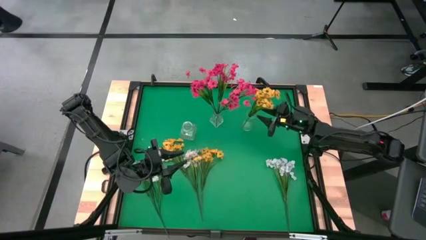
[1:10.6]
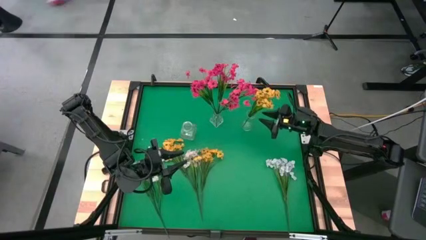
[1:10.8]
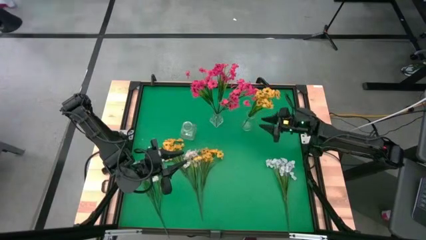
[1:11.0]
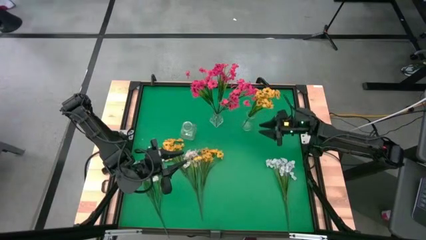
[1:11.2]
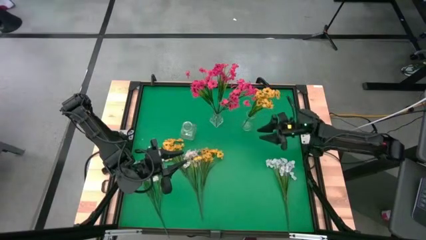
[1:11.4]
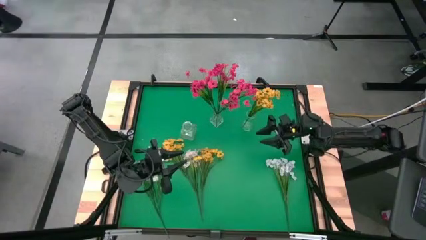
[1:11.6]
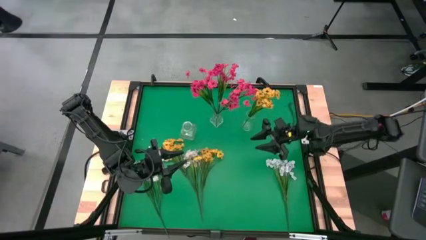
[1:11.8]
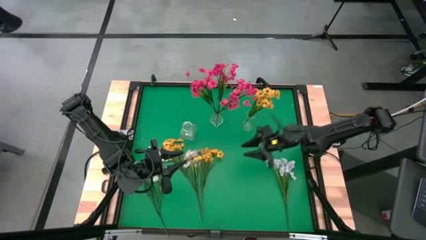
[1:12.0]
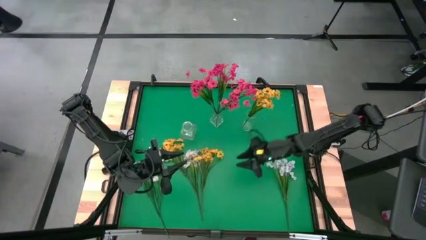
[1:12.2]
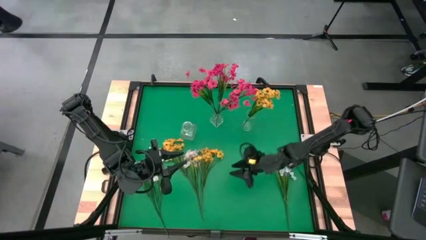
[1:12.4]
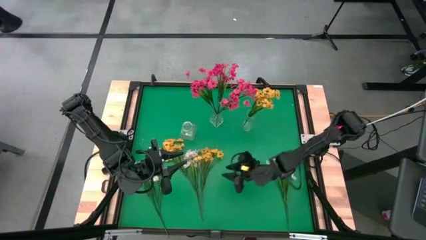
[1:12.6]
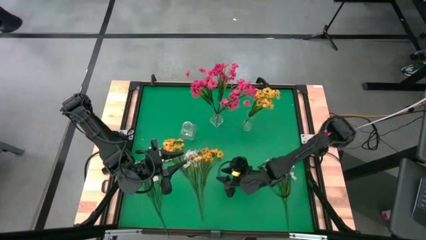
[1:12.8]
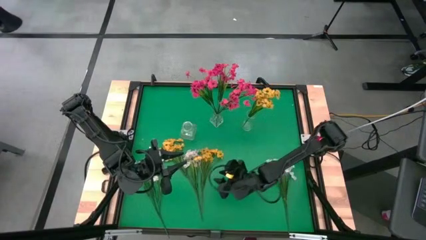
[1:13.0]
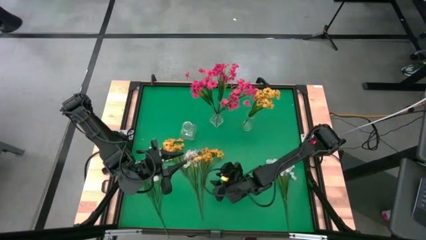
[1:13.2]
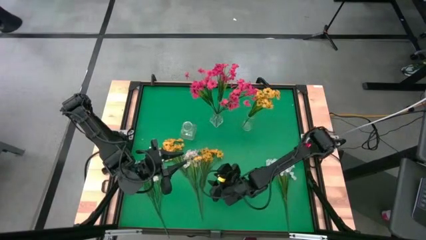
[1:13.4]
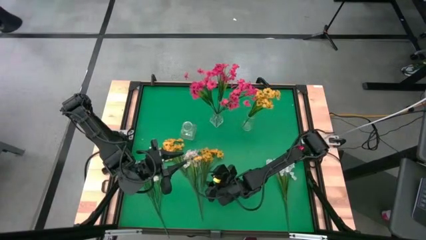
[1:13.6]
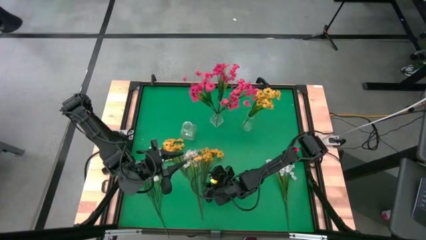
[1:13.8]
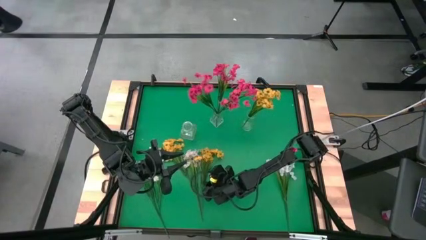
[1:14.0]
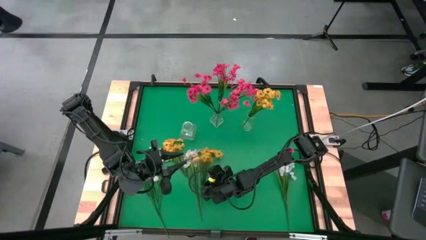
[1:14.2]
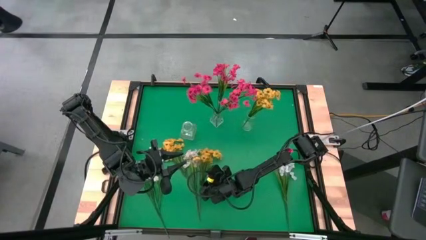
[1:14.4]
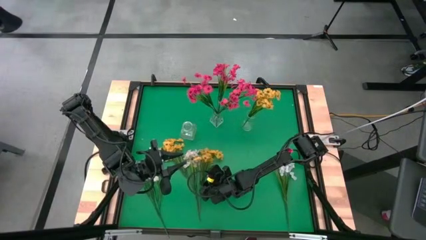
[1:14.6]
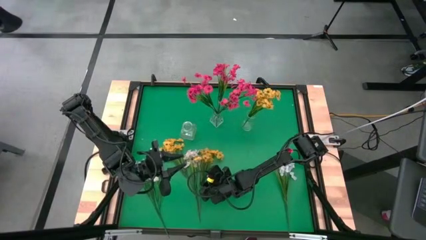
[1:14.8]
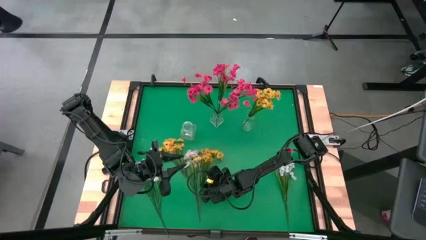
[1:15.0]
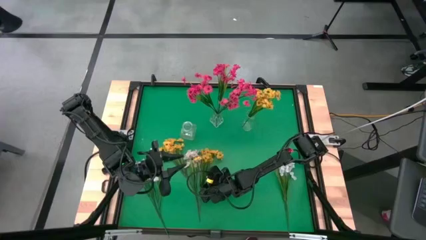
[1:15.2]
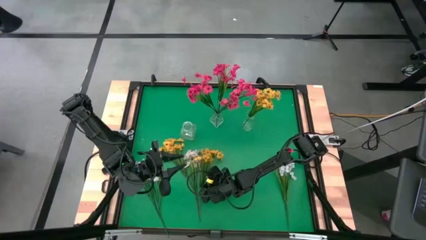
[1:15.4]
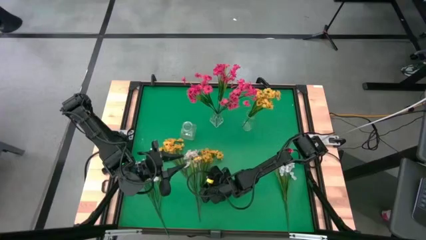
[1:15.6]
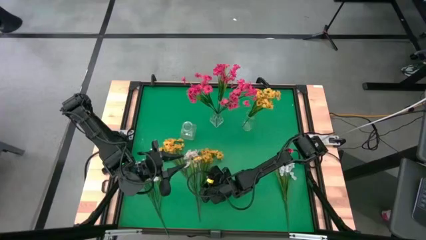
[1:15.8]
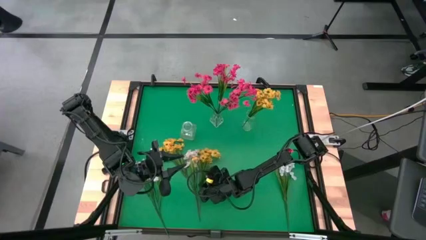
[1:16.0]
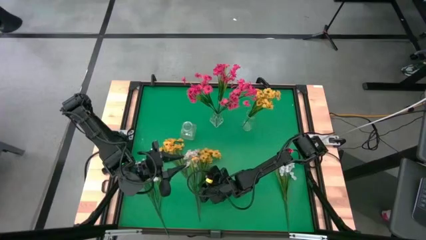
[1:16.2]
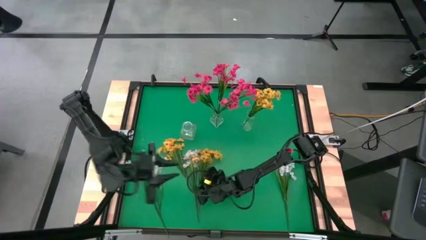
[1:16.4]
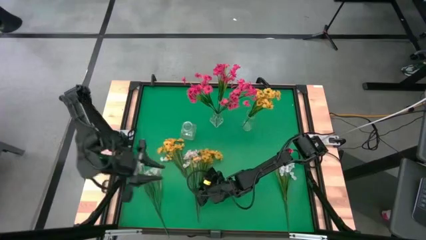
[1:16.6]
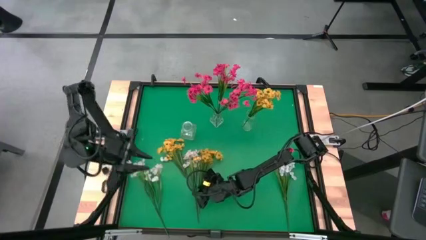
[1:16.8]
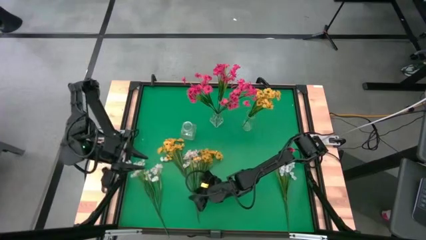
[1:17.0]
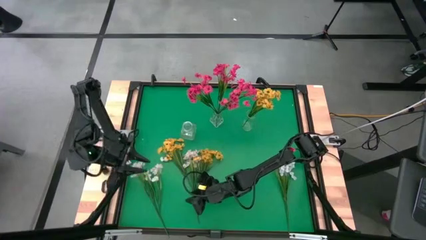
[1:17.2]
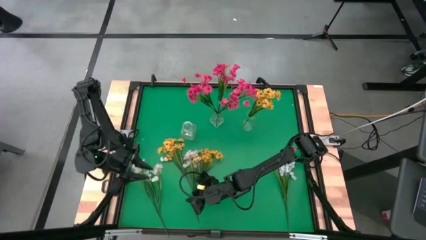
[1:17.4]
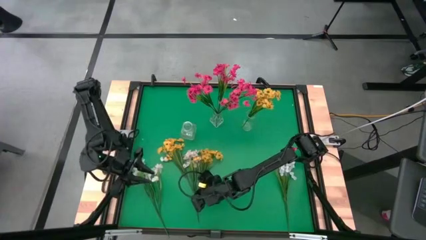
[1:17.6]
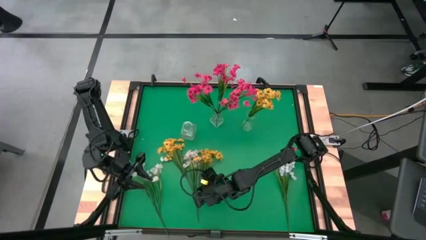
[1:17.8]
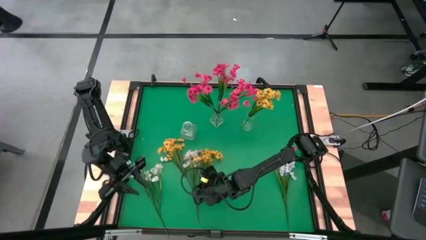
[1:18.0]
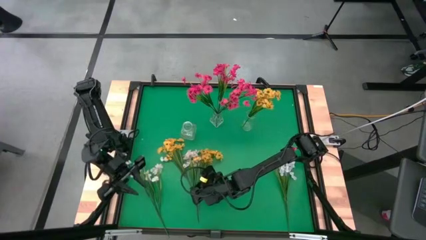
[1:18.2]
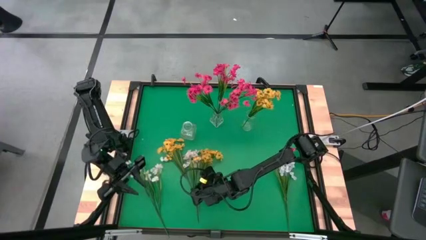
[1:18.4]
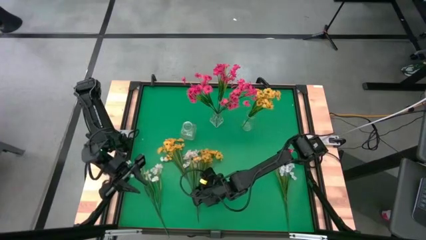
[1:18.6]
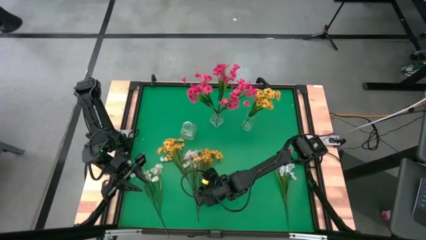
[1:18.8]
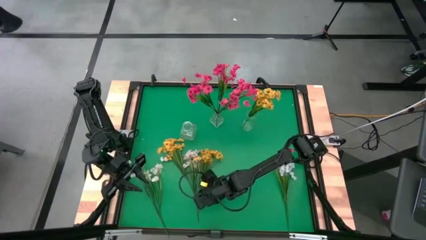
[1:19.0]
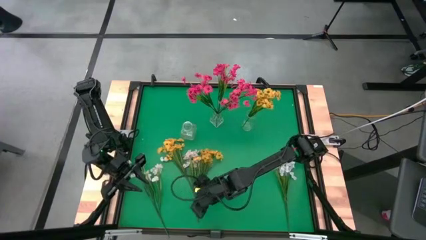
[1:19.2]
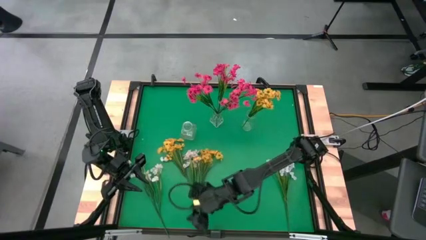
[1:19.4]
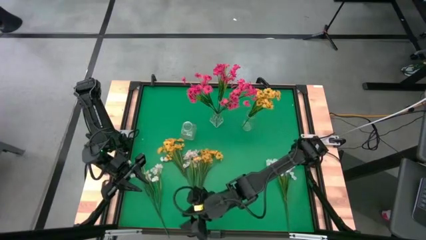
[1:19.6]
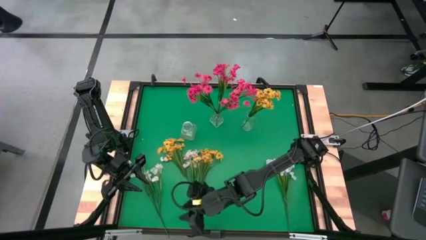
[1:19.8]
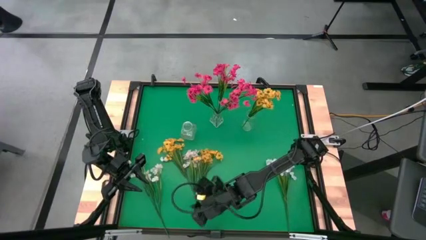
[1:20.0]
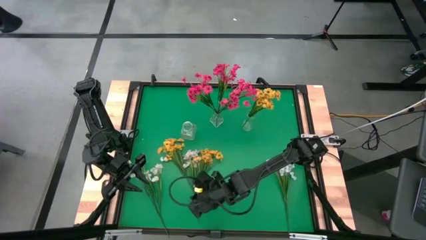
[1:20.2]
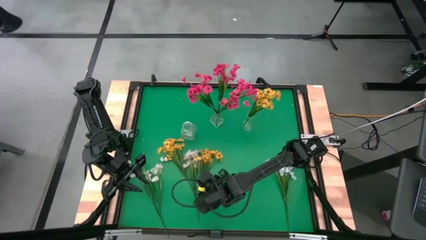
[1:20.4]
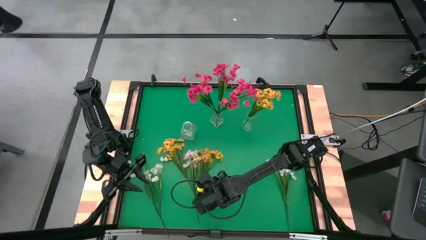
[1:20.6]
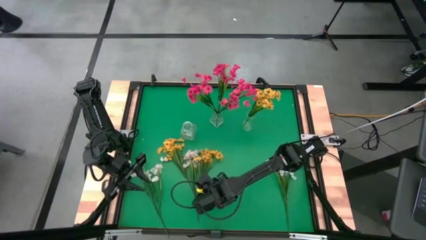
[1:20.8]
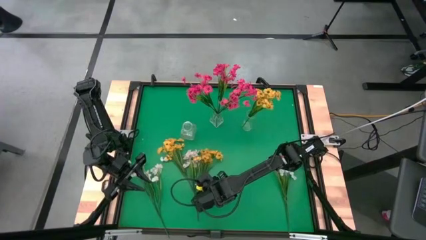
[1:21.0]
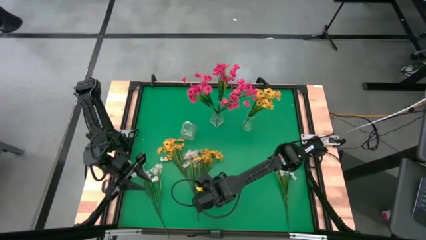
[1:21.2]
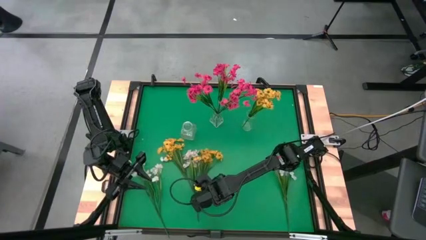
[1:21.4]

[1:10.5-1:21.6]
Task: Sort flowers into vase by color
Put the right yellow flower into the right transparent vase

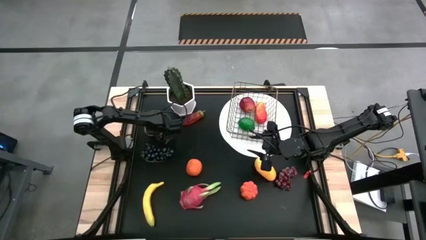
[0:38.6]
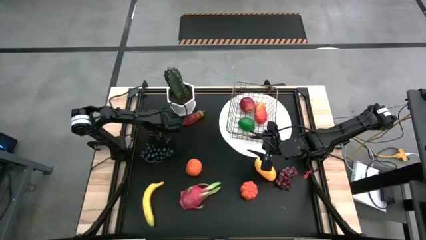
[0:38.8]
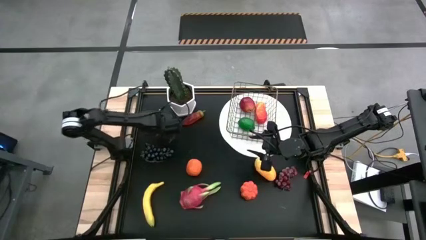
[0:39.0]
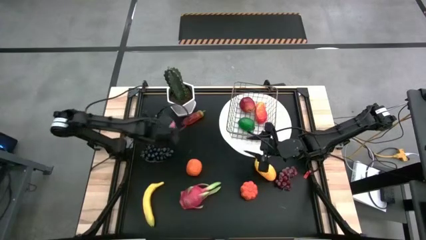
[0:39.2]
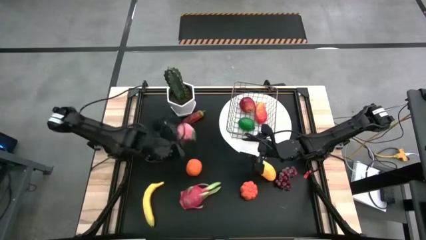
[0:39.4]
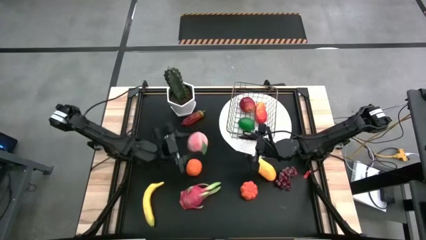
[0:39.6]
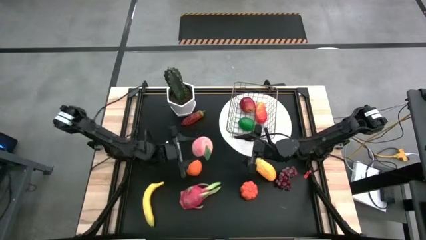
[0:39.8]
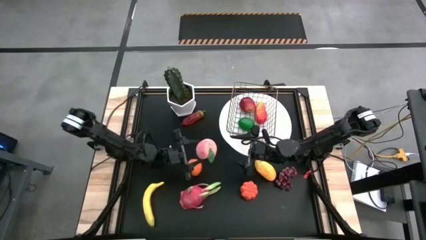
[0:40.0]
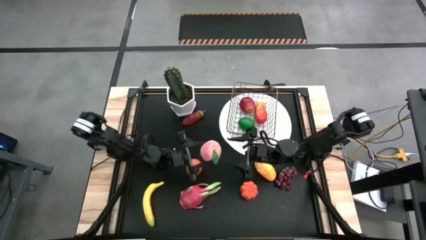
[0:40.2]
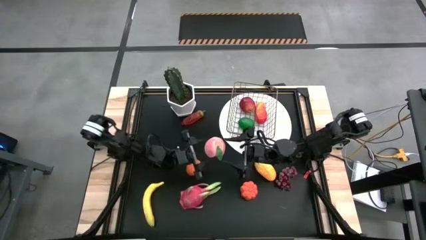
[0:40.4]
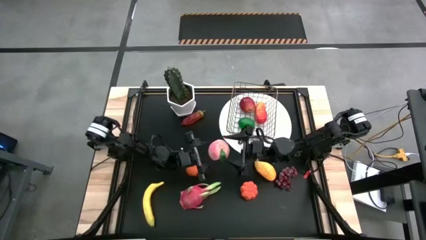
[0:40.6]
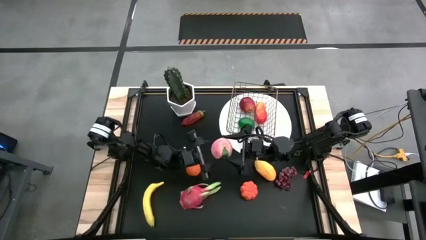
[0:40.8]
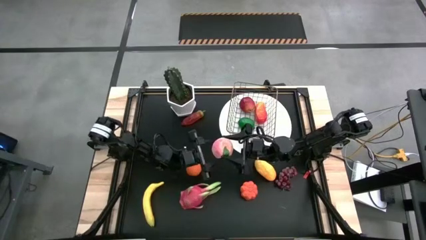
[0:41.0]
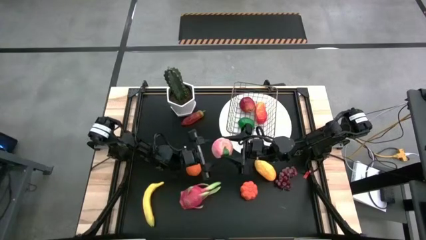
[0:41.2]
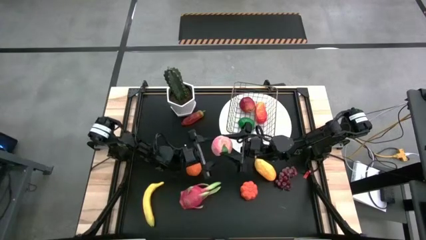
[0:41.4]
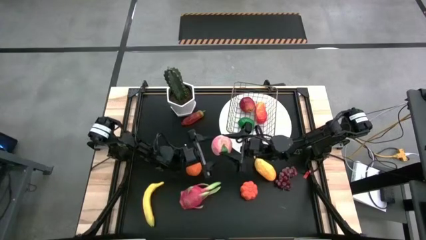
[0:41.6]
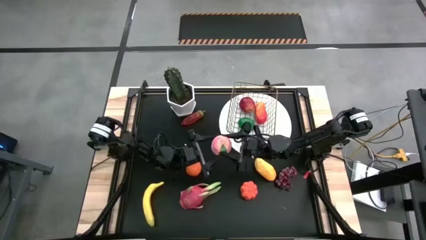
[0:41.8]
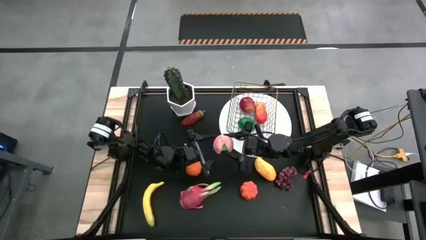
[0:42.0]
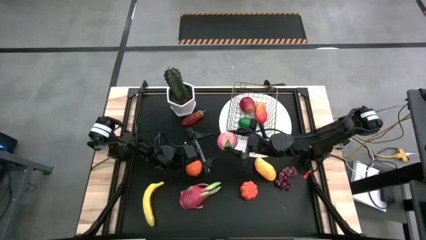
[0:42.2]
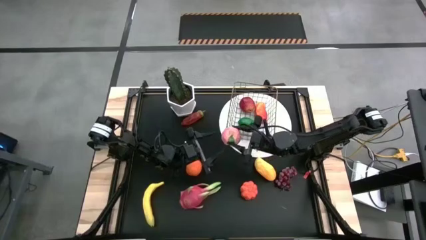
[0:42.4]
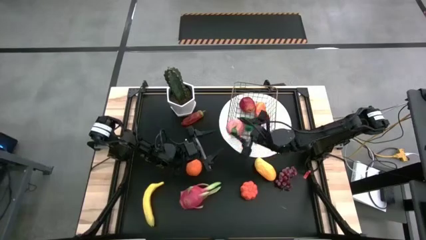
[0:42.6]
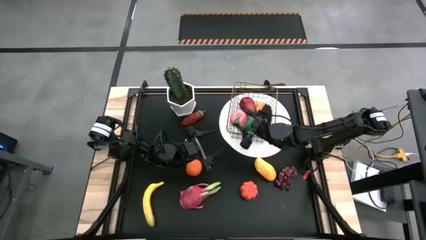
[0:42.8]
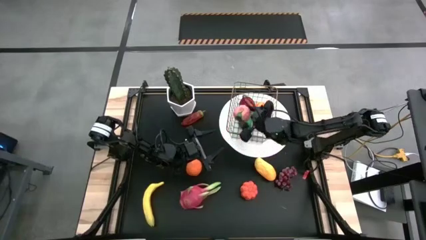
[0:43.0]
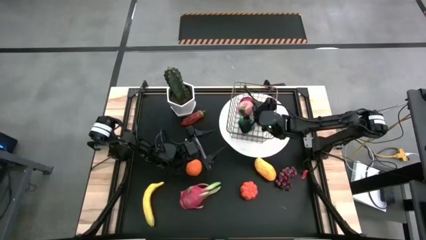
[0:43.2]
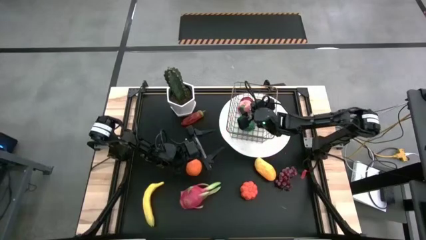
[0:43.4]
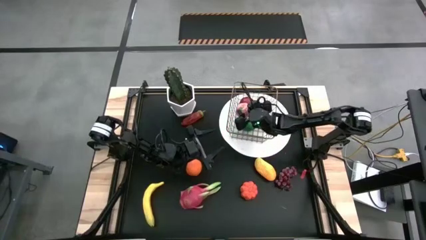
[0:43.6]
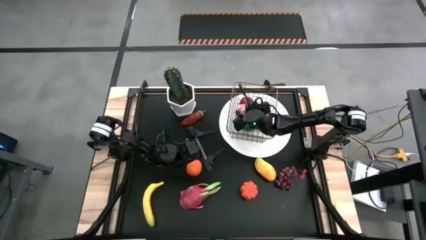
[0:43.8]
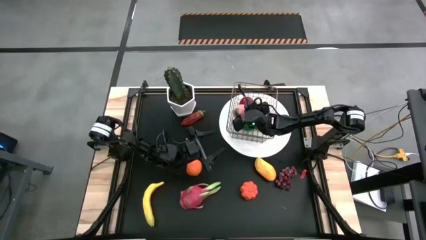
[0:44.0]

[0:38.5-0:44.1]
Task: Build produce basket
Put the peach into the wire basket
